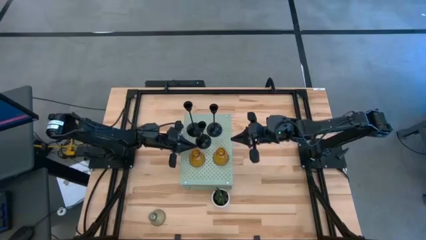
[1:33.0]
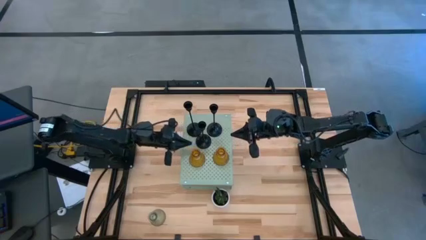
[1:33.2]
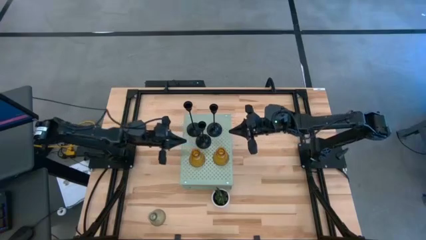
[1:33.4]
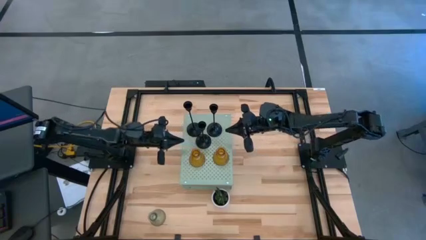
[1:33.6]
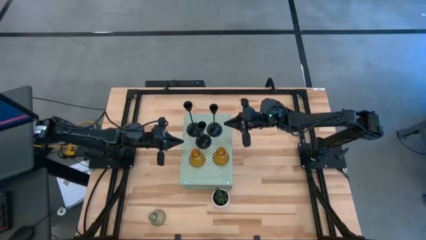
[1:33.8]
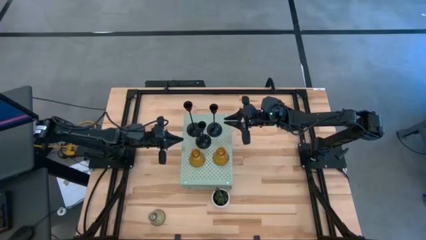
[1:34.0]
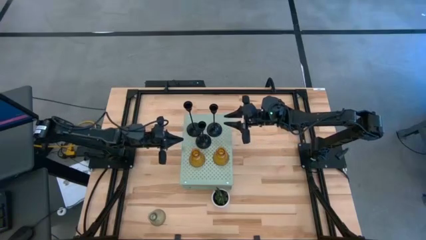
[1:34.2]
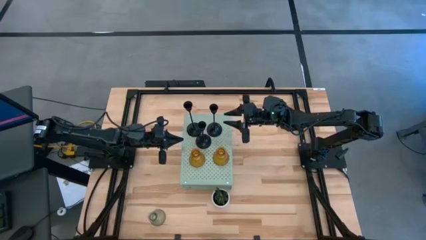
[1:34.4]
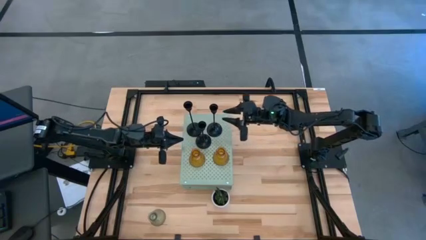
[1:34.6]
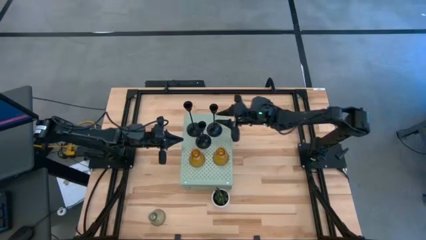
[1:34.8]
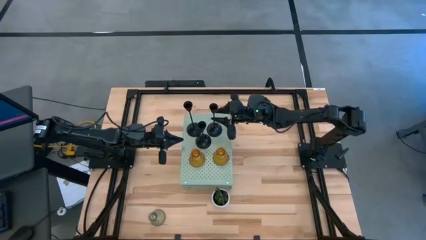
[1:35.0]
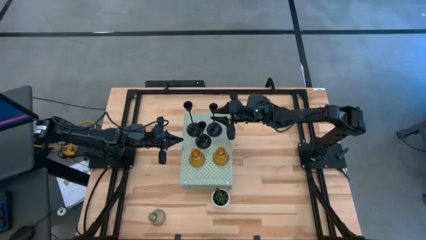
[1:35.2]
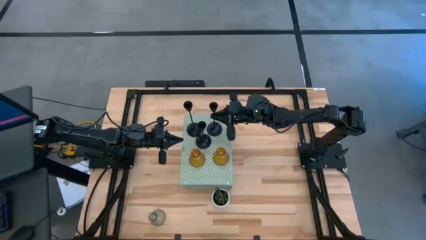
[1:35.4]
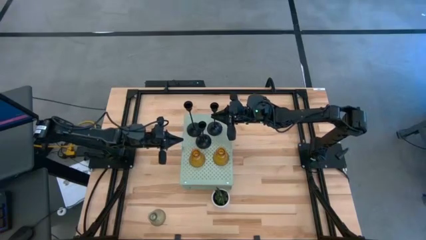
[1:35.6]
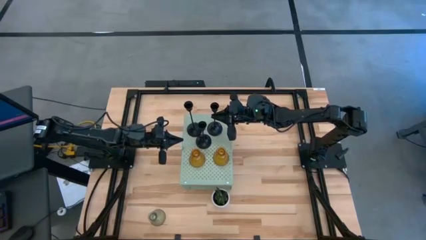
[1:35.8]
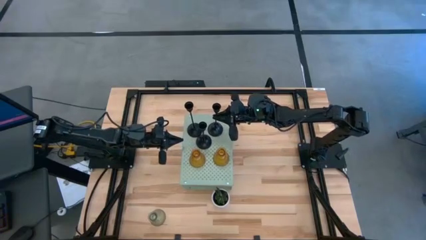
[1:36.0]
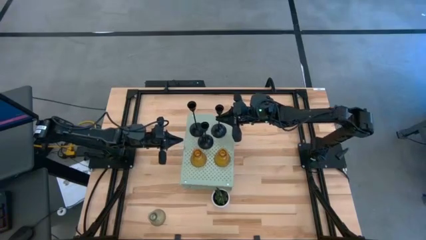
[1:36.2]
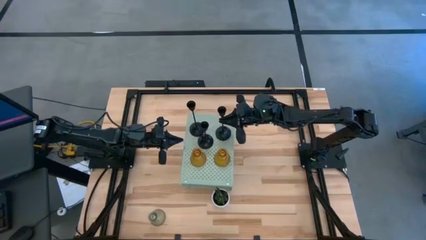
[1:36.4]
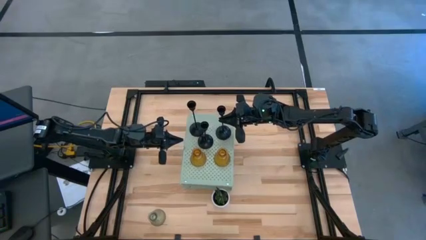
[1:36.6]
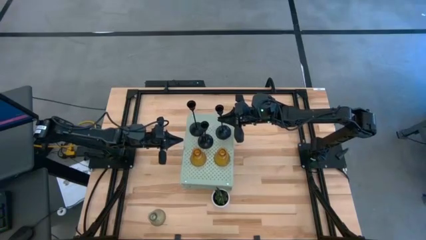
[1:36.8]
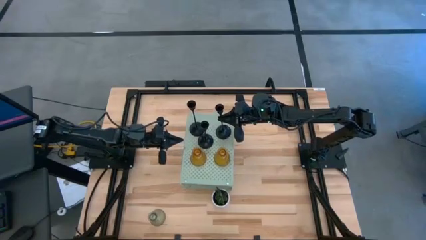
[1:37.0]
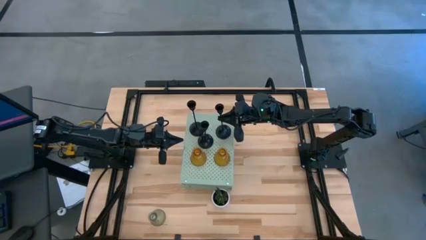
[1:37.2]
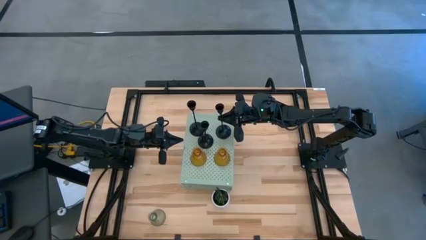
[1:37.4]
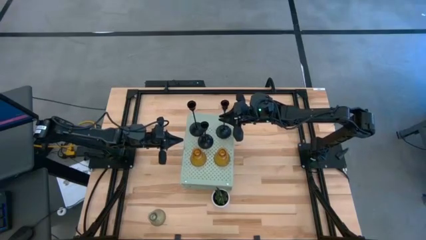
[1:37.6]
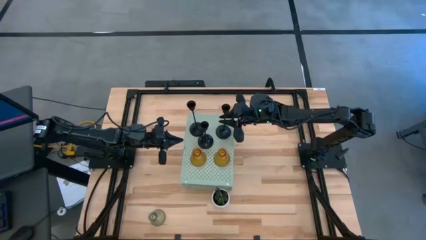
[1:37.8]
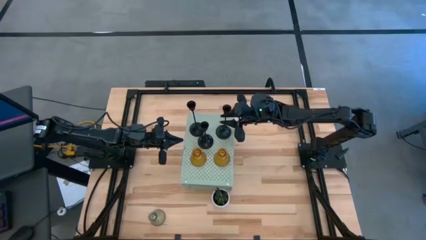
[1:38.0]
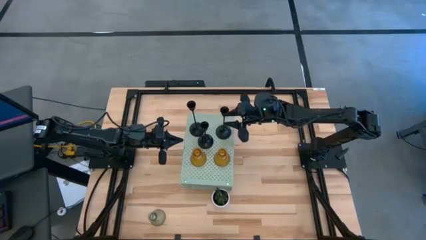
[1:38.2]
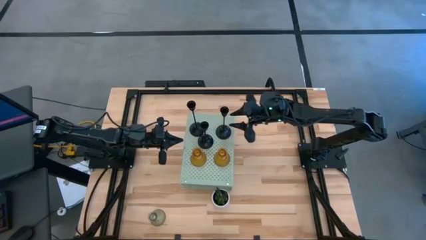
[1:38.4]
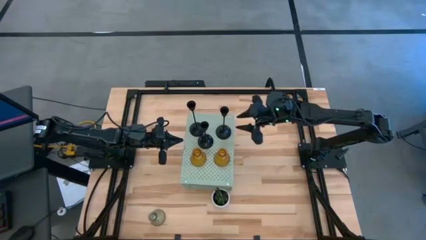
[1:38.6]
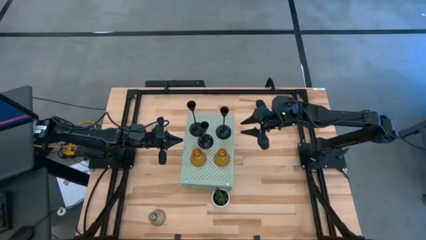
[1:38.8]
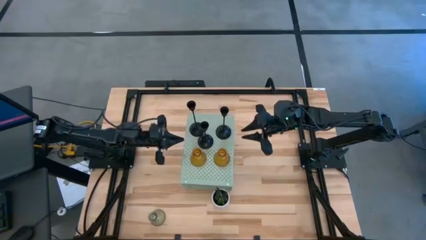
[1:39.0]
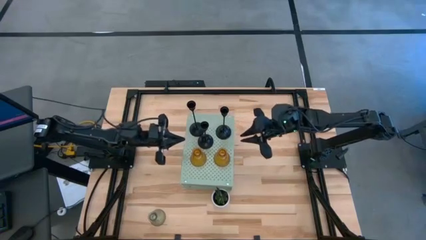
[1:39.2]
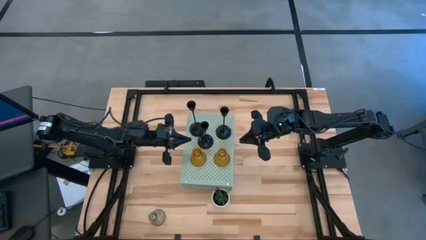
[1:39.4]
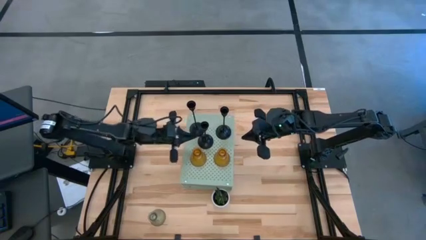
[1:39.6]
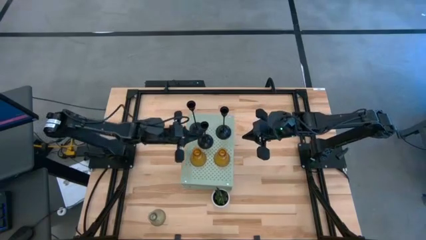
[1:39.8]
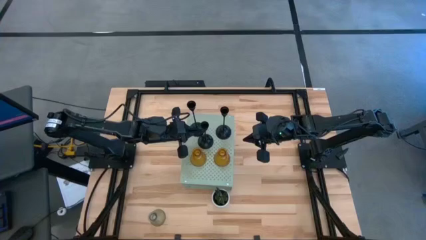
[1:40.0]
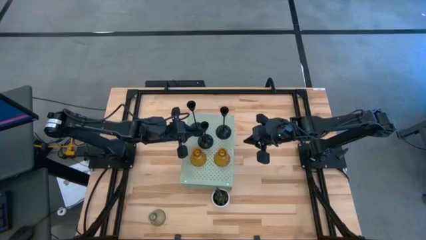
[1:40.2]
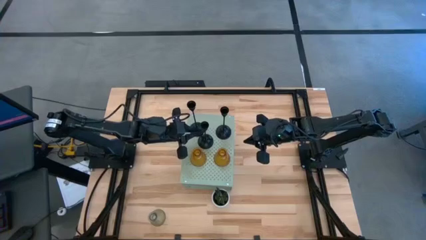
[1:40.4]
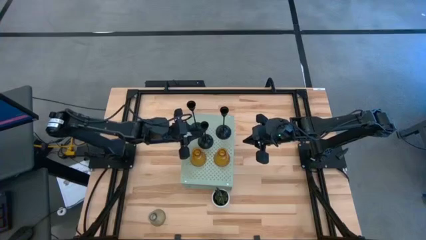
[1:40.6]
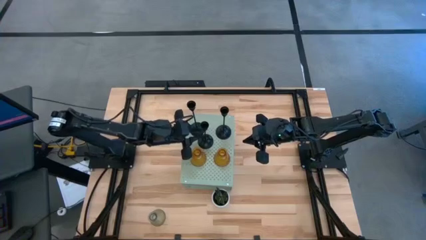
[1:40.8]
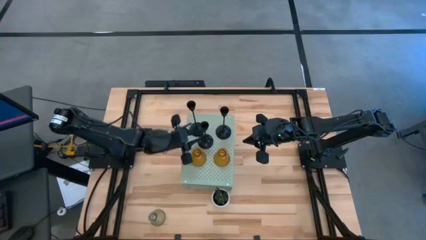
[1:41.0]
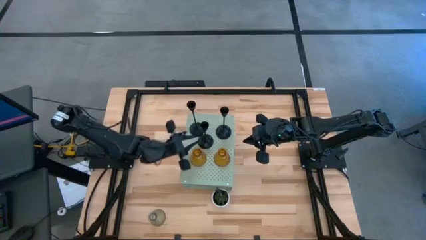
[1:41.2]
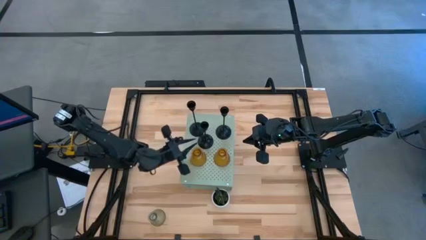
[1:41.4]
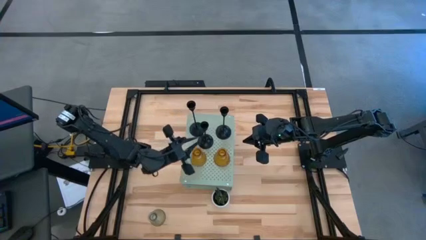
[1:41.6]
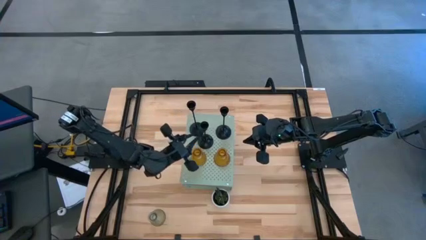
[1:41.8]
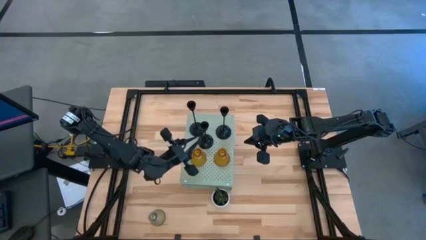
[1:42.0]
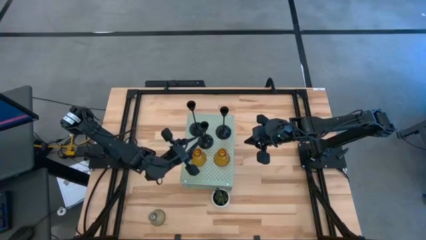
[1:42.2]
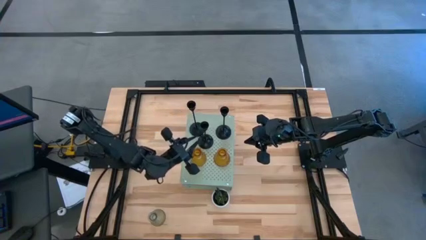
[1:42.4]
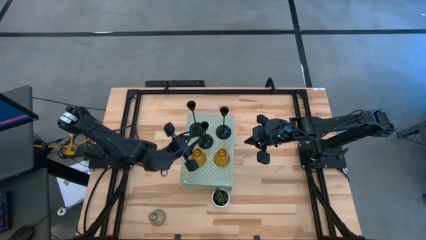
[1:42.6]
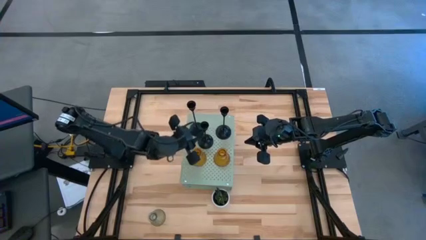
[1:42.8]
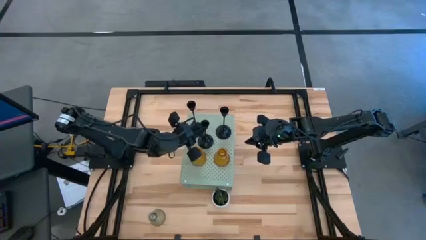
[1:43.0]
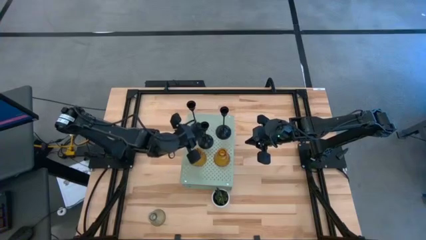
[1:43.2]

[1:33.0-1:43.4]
Task: Pick & Place candle stick holders
Adjust the black candle holders on the shelf

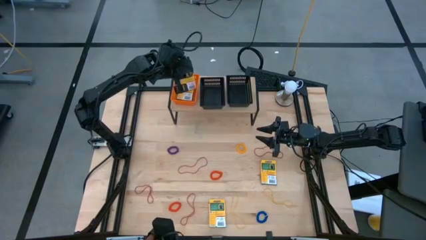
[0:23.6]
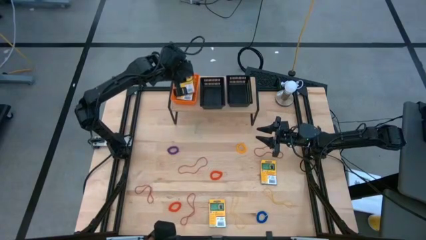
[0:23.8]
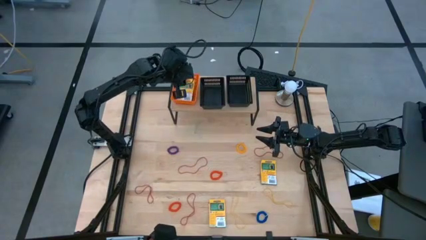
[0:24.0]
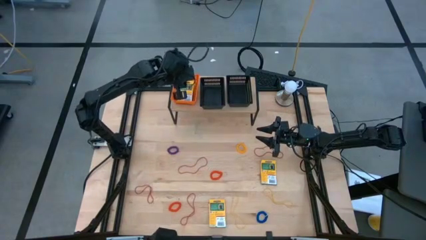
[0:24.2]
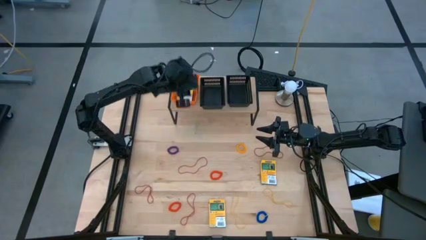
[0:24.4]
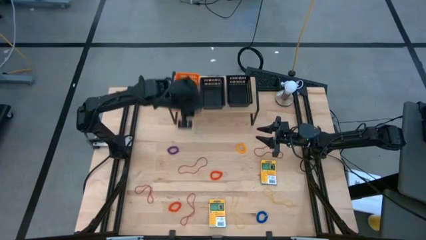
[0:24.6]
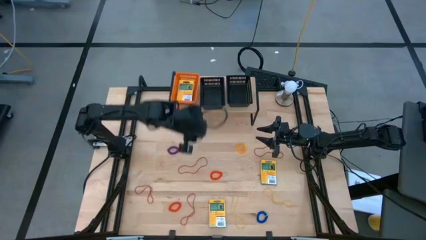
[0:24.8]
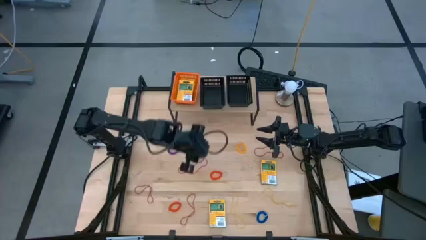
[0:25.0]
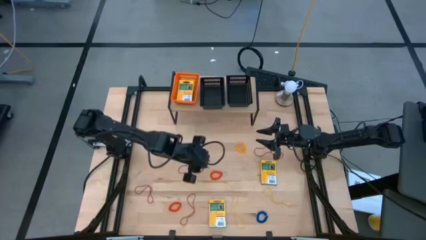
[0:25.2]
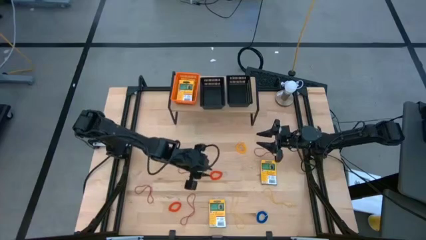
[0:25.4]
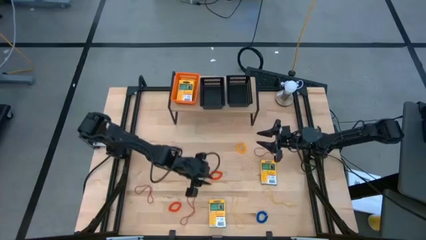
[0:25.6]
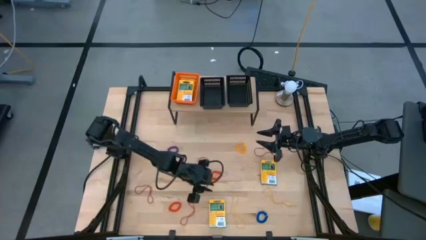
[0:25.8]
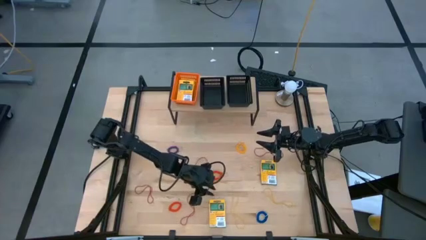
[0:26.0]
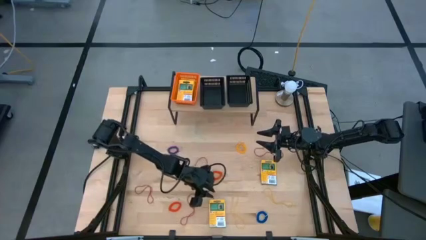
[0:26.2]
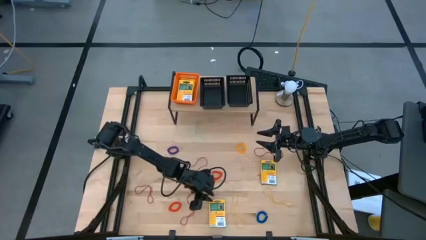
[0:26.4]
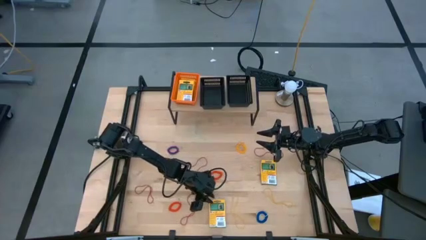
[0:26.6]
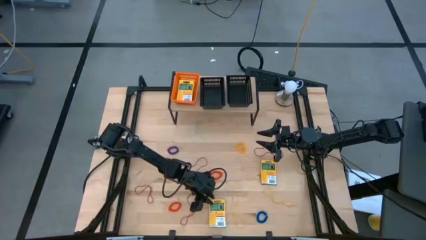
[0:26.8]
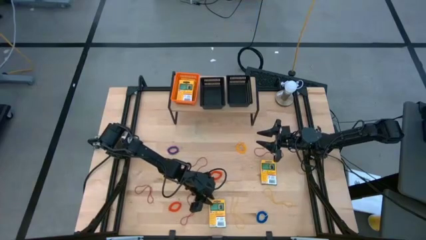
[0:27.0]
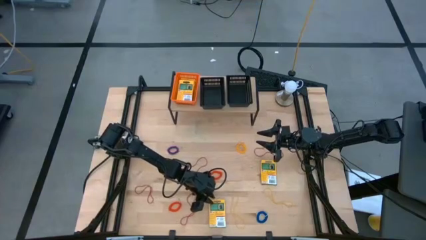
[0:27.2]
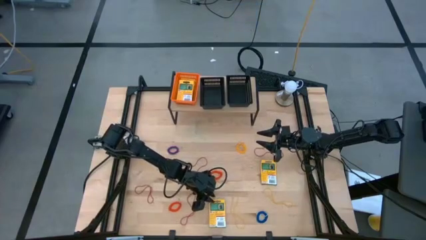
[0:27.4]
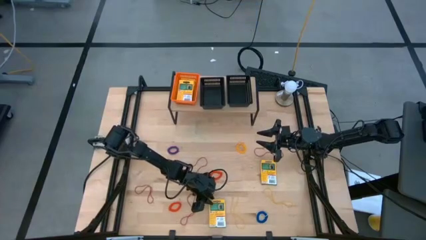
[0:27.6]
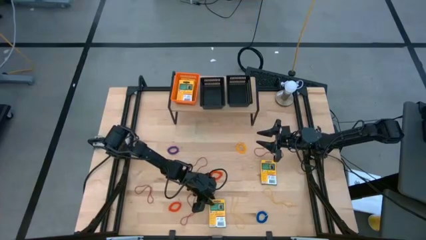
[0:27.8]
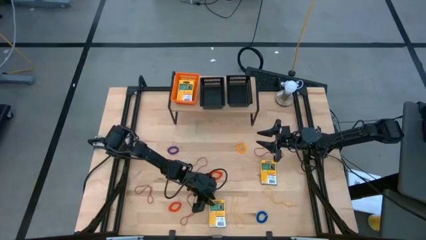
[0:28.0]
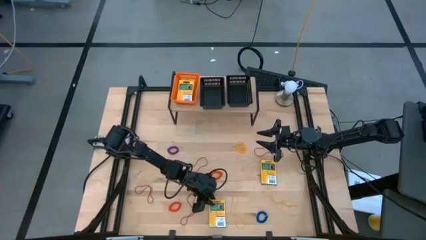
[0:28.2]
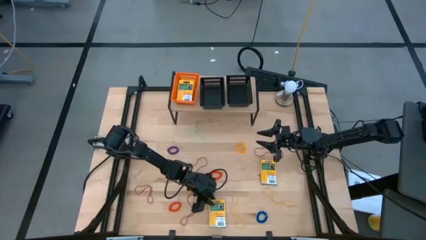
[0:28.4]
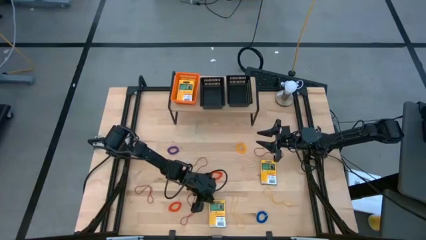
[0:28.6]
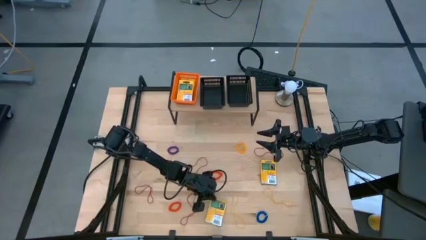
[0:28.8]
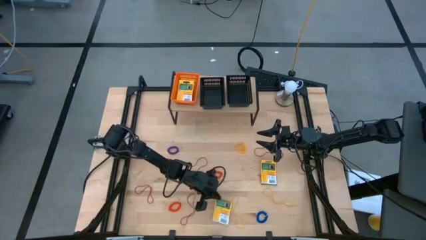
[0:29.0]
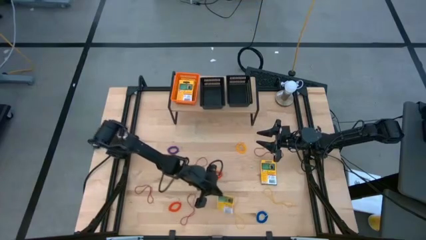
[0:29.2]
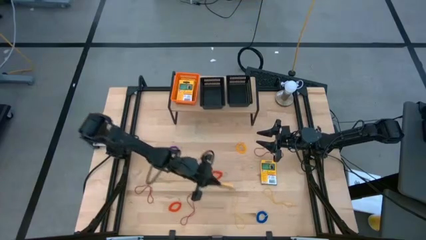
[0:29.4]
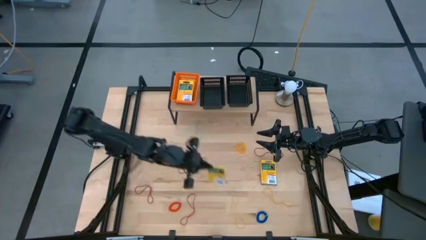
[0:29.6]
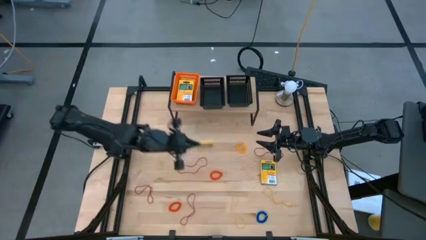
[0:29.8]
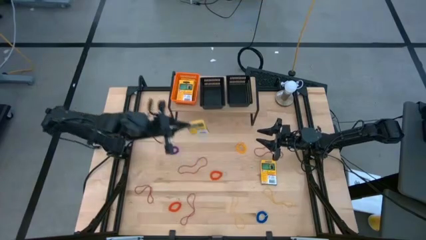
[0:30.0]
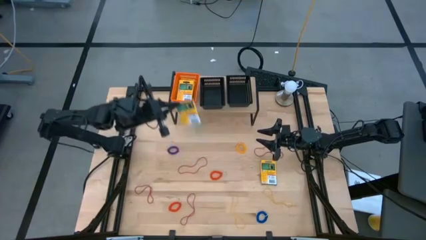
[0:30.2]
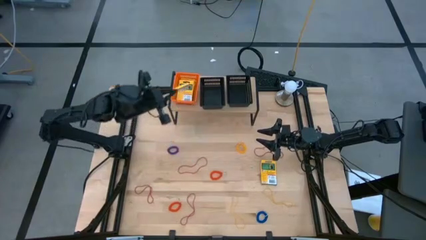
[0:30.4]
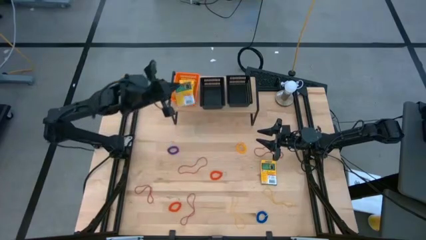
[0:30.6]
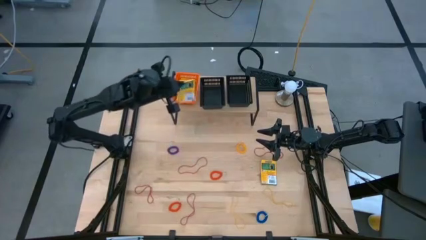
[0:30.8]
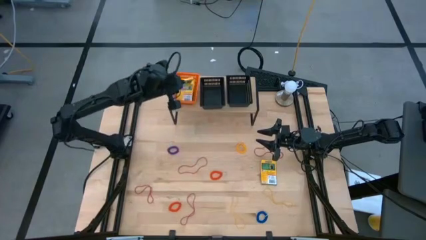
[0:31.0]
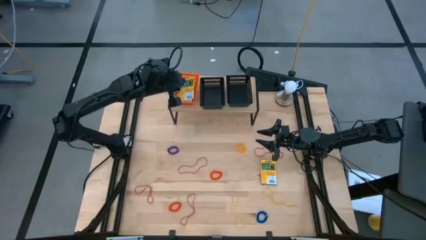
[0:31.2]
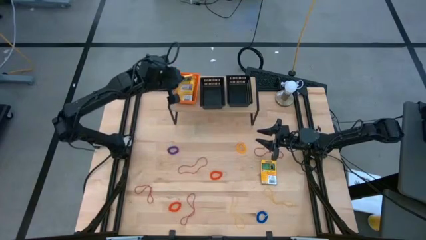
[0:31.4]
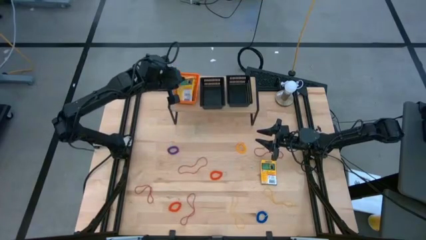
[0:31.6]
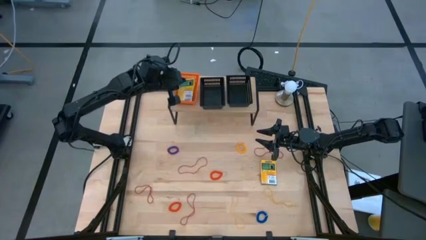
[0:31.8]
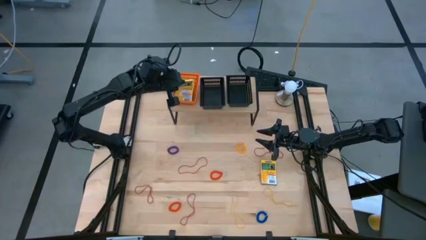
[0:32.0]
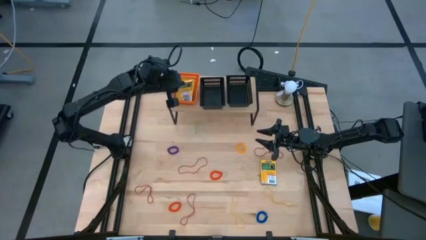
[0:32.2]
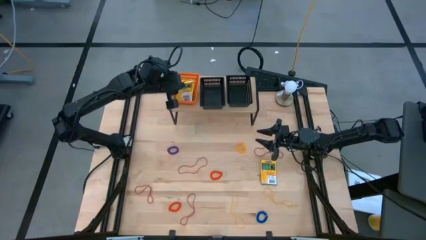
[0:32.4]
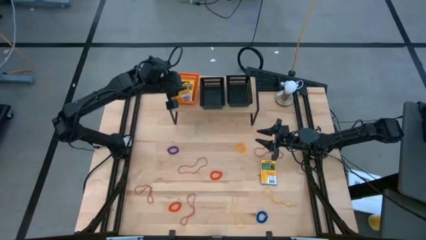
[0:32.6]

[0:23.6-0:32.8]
Task: Pick & Place Office Desk Supplies
Put the crayon box into the orange basket on the shelf
